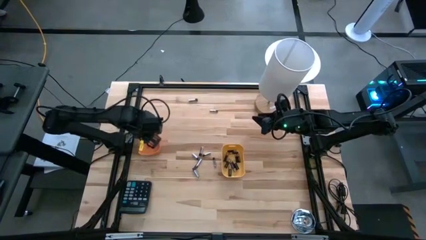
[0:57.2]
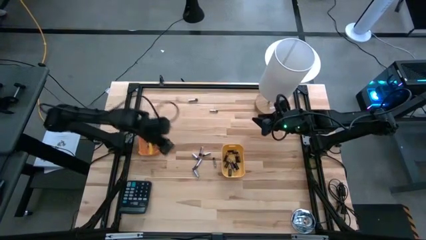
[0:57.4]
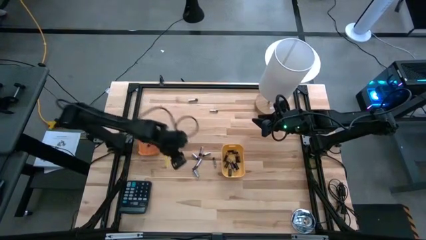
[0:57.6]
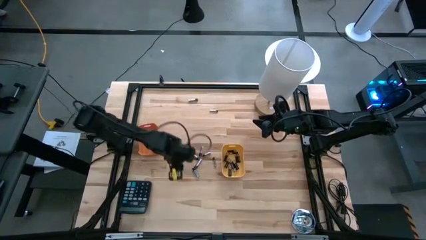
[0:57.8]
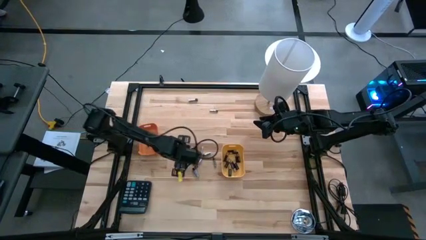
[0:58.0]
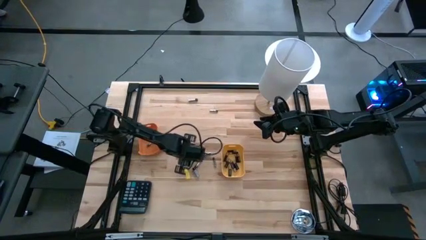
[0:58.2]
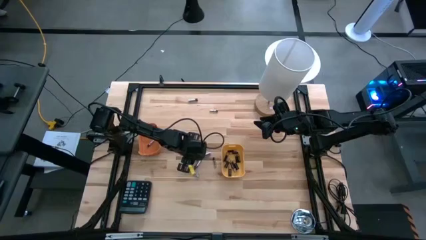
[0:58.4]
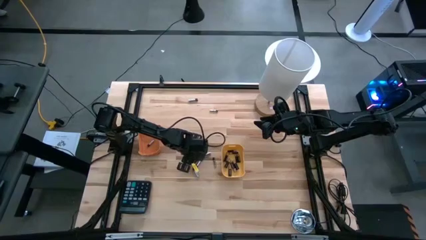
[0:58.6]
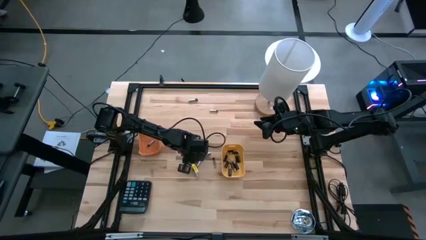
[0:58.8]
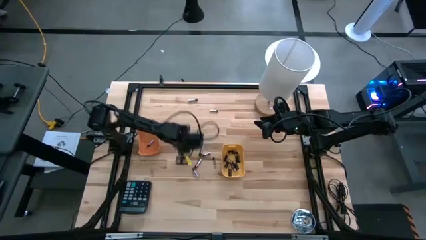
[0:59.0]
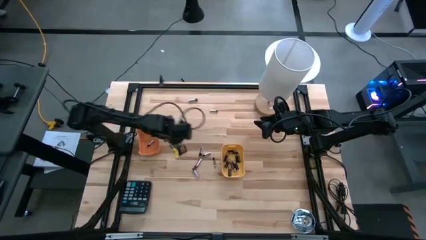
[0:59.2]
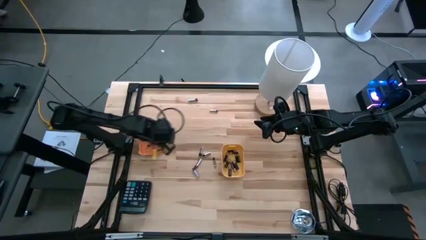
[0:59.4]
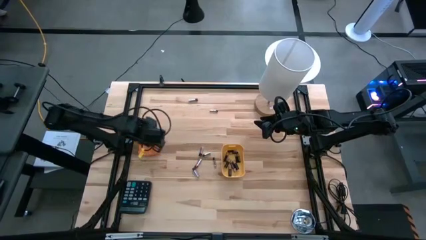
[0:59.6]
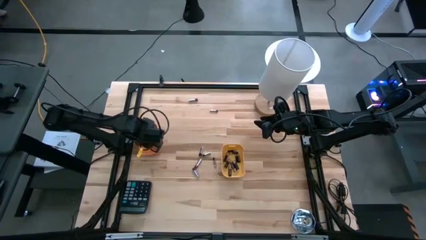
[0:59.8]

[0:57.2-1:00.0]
Task: Sort batteries
Put the silver battery into the orange bin

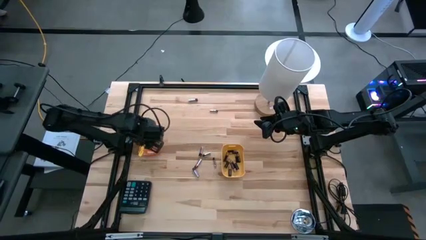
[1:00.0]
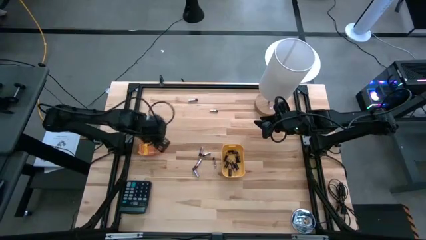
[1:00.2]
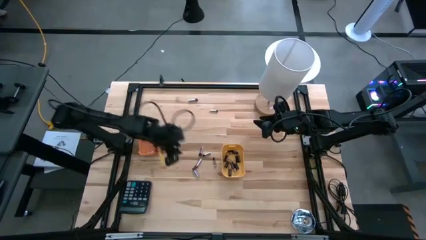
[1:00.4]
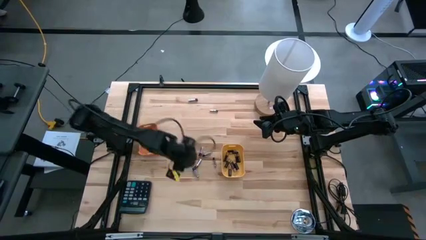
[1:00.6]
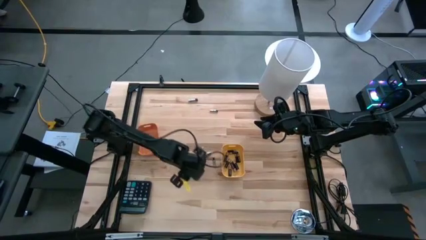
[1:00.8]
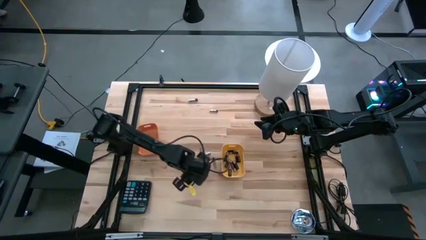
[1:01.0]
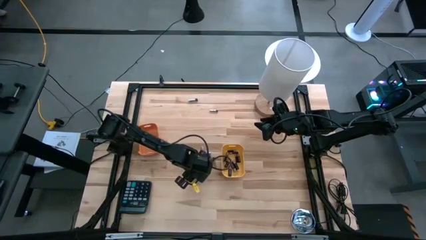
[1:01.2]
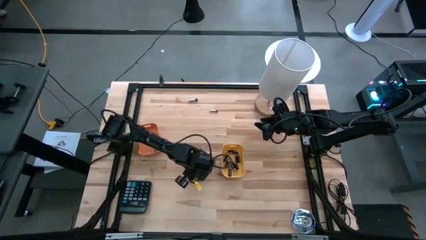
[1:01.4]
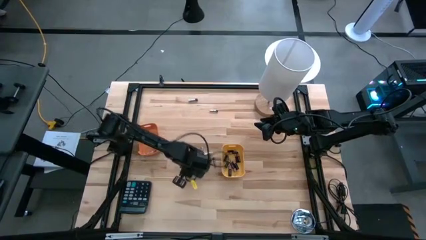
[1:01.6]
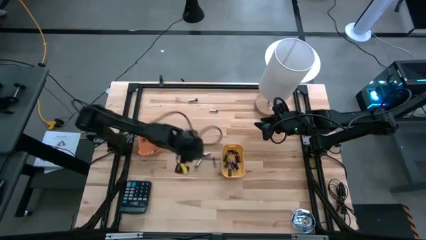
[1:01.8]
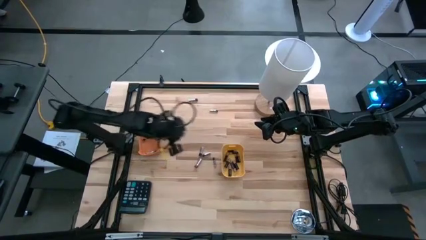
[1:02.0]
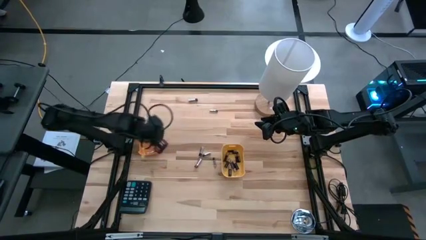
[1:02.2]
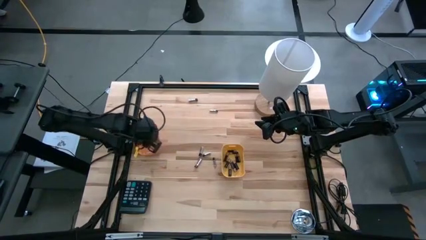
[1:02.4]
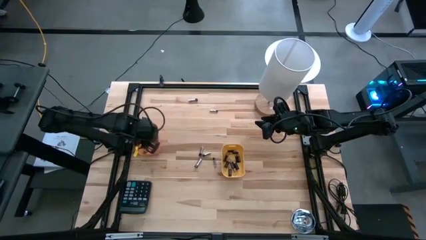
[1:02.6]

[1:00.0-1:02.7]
Put the silver battery into the orange bin

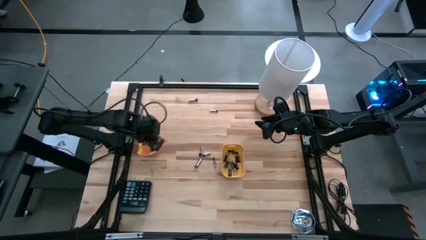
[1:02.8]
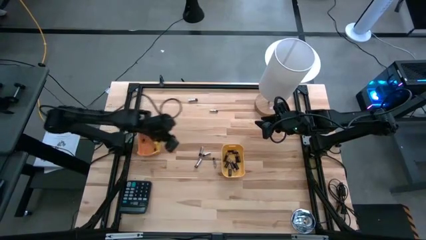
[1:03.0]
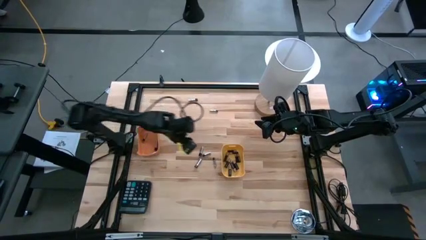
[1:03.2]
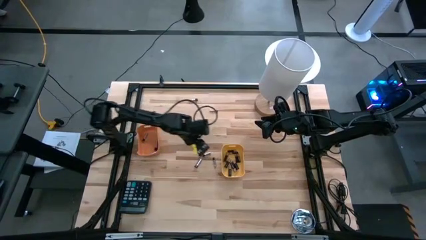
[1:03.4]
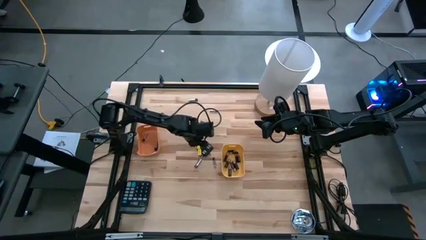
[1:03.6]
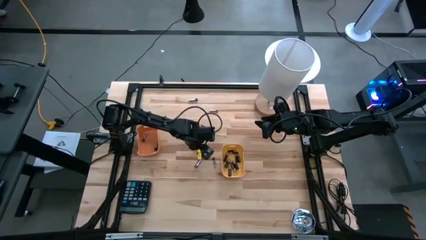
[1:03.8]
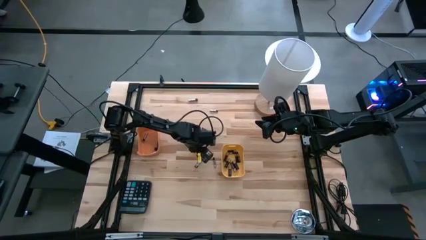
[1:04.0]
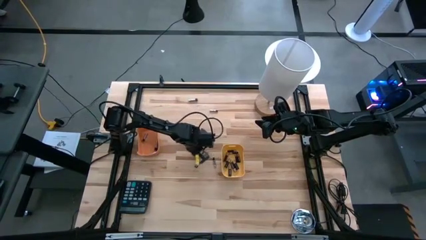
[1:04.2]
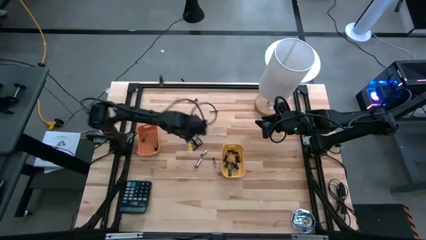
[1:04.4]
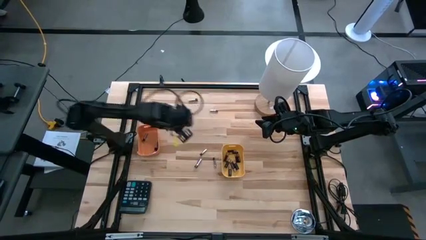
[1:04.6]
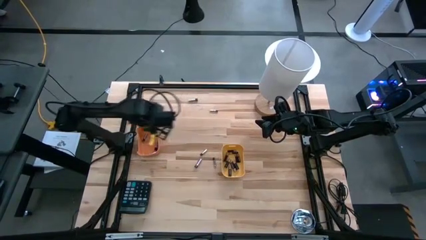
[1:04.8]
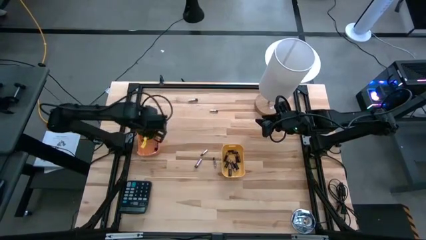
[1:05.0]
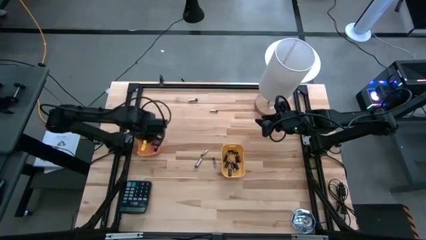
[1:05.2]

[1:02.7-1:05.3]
Put the silver battery into the orange bin

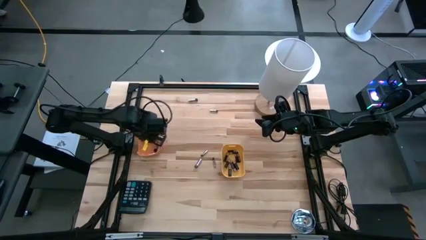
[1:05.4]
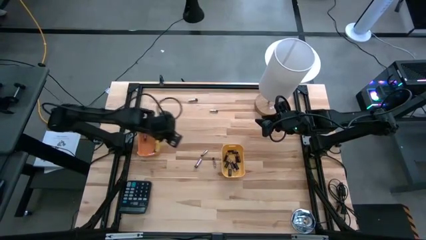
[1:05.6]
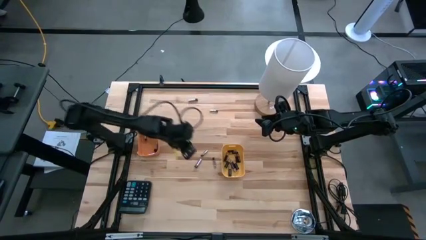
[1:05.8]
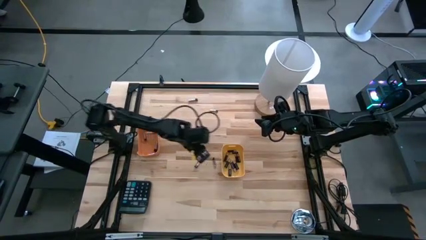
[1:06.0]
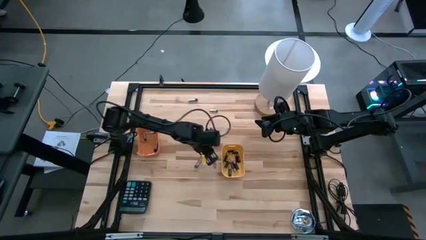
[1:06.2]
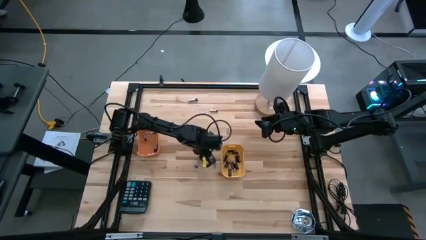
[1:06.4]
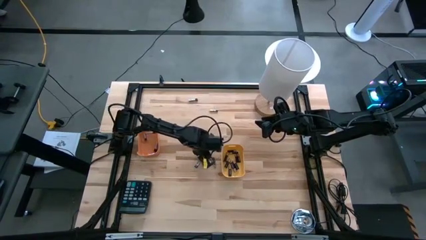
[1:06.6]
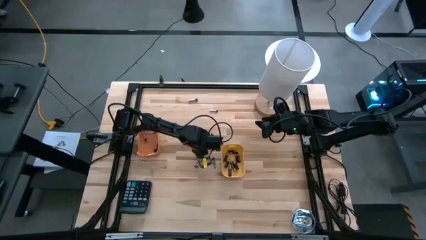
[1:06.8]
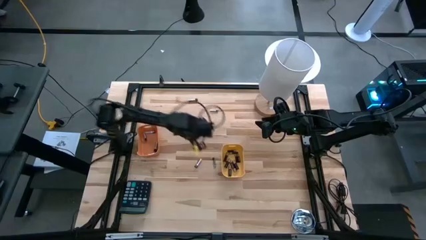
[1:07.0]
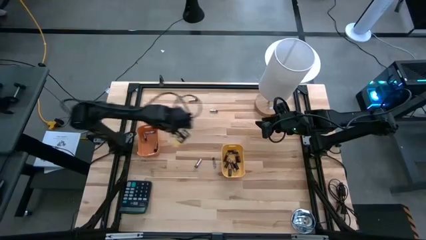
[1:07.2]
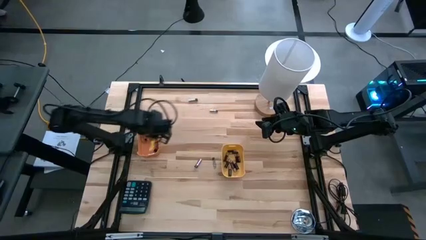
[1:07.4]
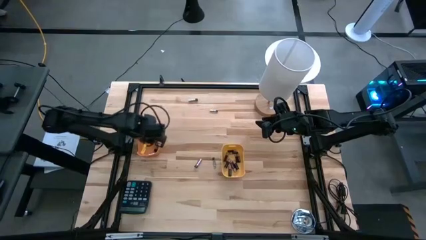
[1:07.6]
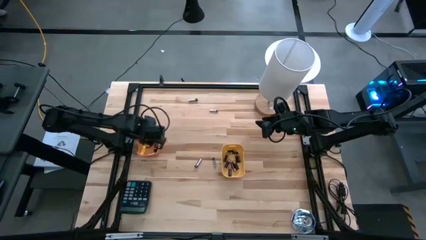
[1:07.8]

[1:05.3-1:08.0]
Put the silver battery into the orange bin

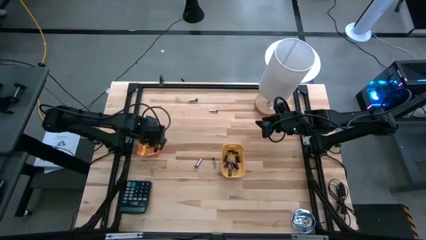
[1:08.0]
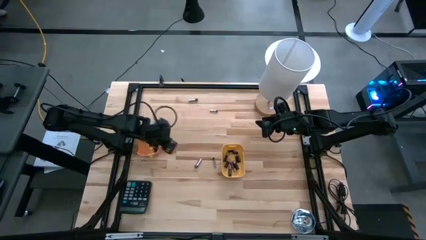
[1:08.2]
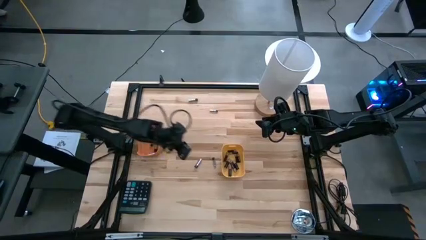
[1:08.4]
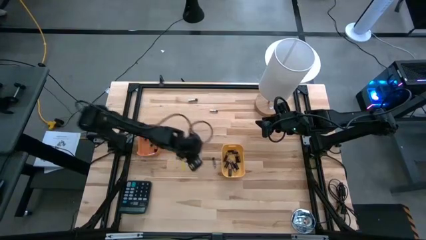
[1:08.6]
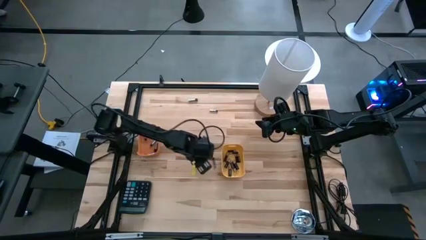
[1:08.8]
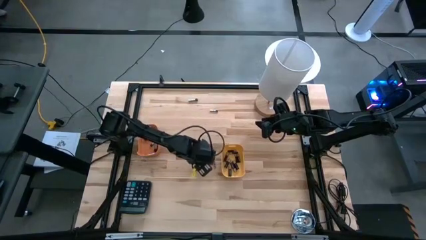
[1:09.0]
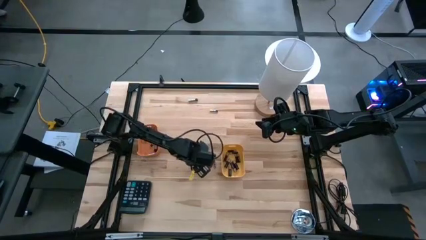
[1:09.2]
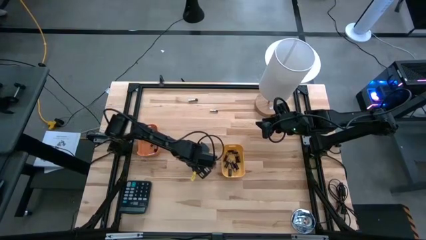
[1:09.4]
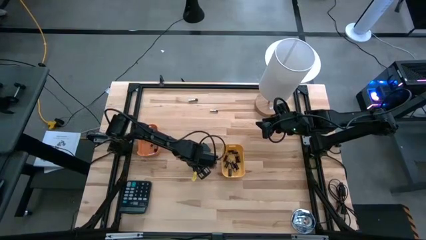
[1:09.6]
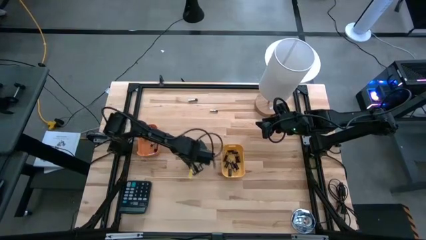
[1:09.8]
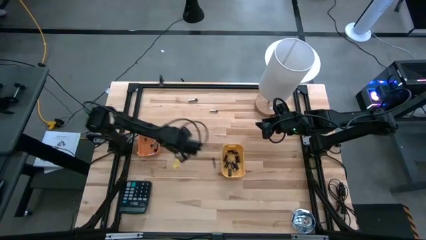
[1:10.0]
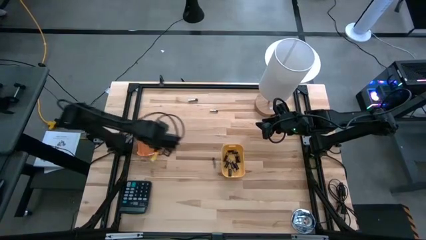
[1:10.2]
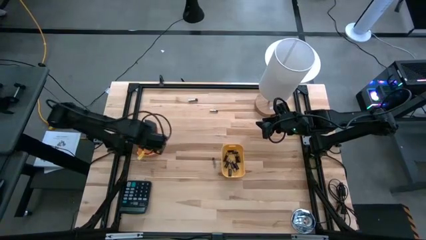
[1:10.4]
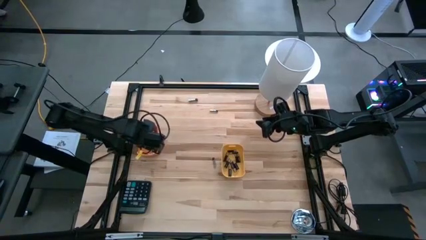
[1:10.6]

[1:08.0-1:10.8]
Put the silver battery into the orange bin

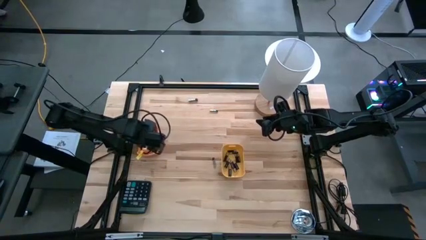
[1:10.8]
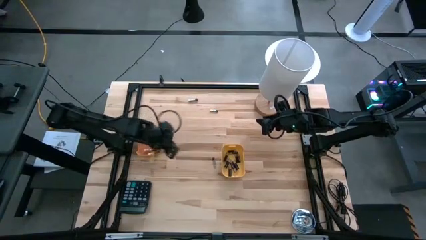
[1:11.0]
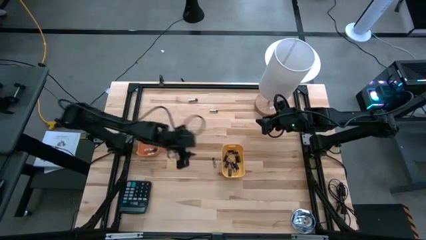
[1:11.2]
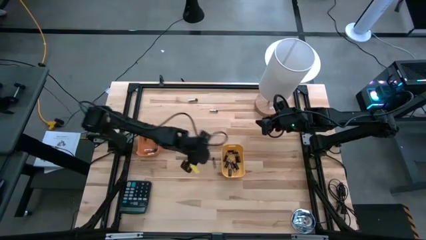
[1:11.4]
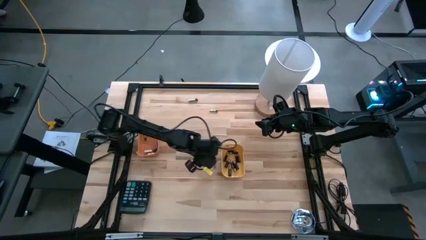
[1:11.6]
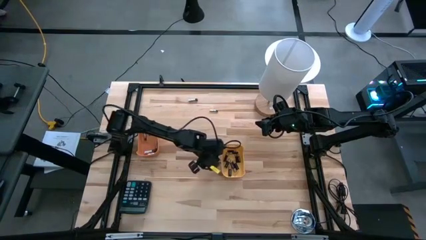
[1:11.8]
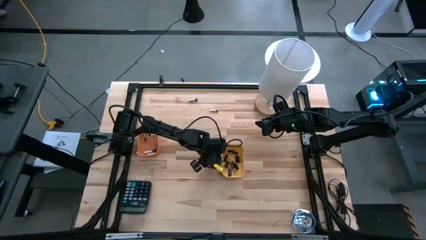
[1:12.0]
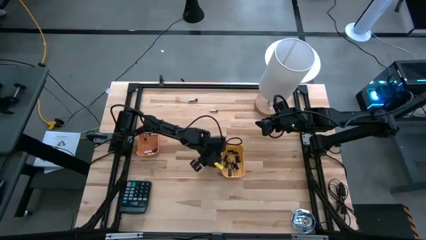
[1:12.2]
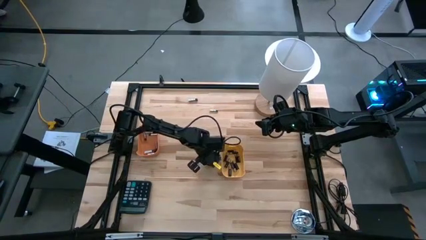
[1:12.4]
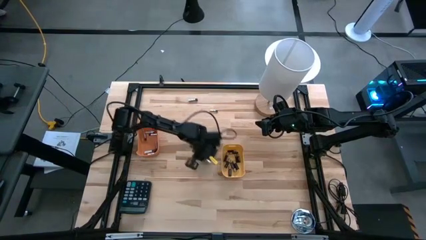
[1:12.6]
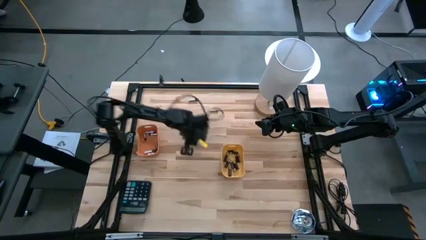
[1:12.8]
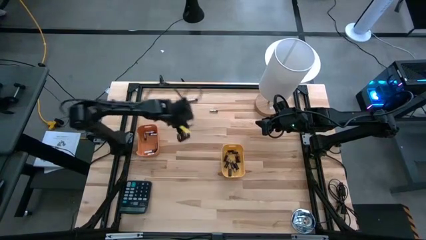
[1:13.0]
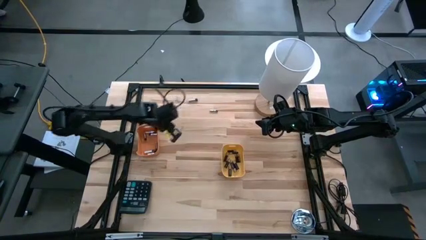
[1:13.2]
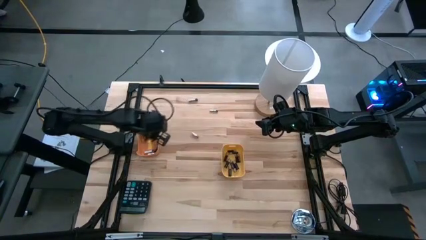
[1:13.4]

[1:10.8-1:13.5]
Put the silver battery into the orange bin

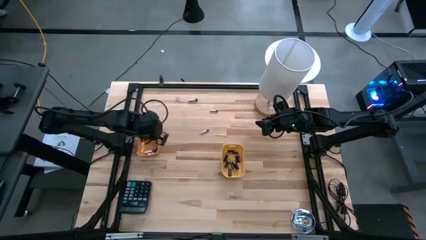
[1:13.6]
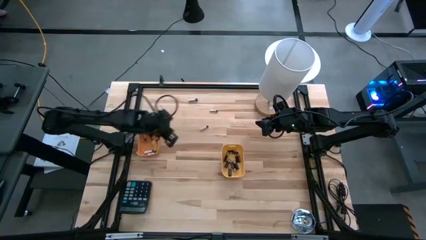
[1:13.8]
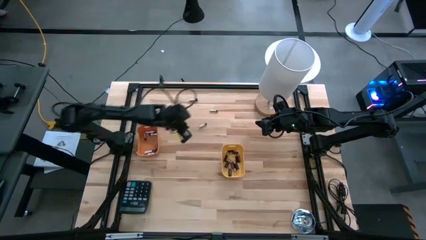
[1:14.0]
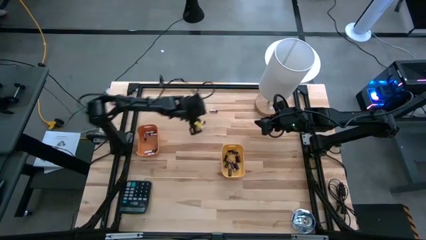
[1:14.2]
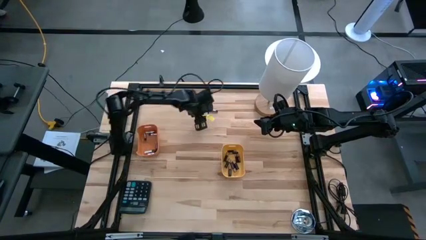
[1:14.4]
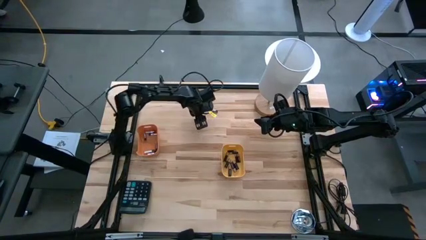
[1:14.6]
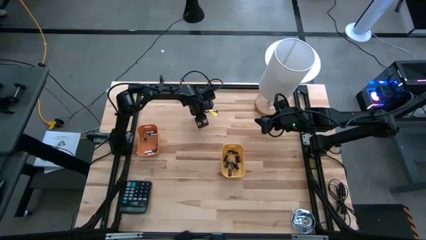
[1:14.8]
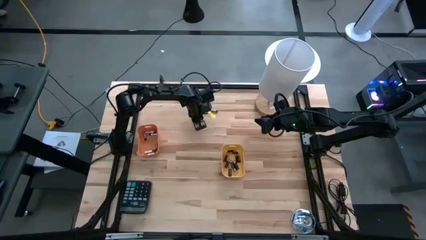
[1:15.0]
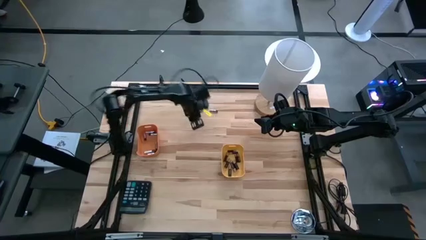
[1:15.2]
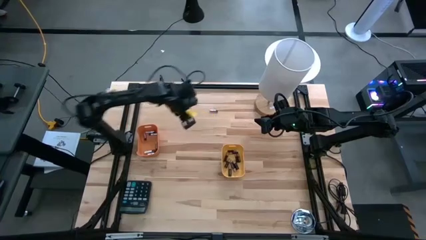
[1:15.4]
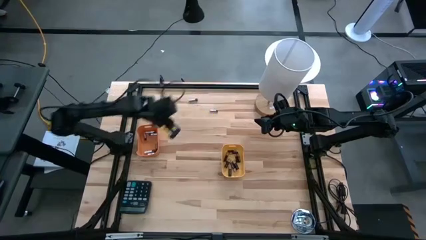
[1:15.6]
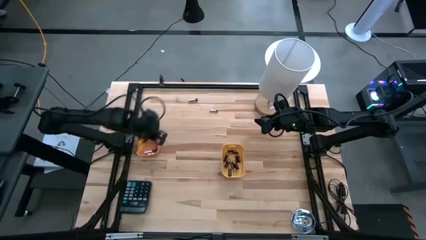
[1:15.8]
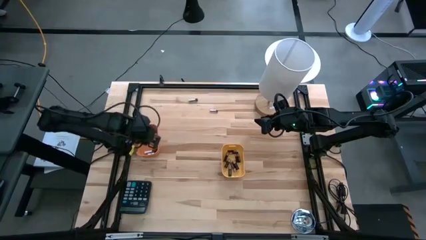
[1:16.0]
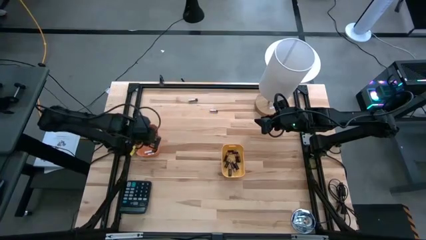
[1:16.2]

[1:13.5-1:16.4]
Put the silver battery into the orange bin
